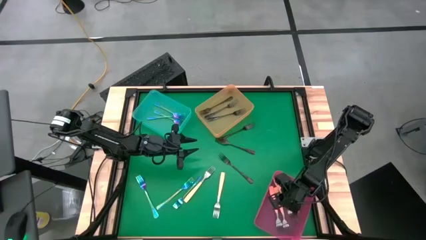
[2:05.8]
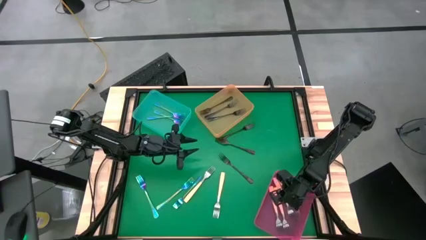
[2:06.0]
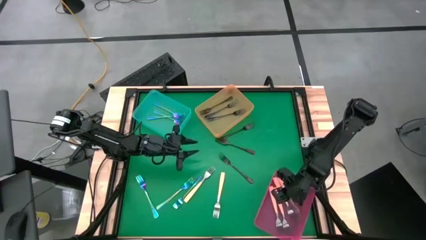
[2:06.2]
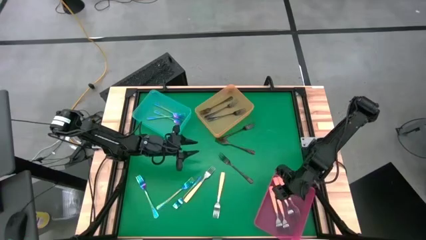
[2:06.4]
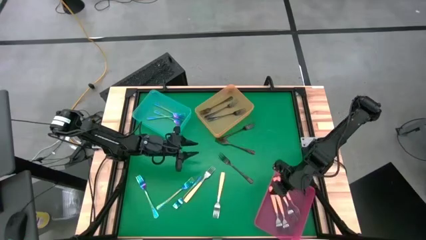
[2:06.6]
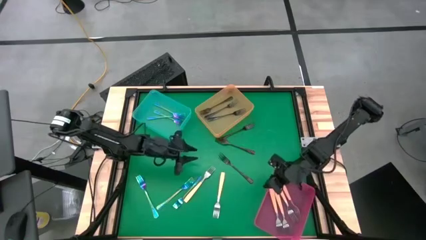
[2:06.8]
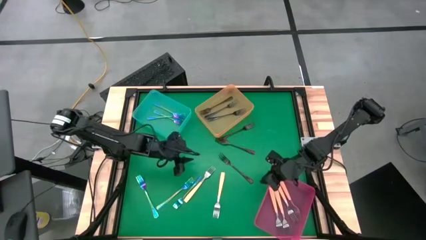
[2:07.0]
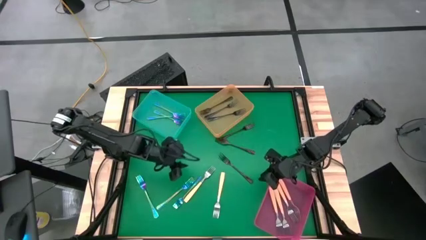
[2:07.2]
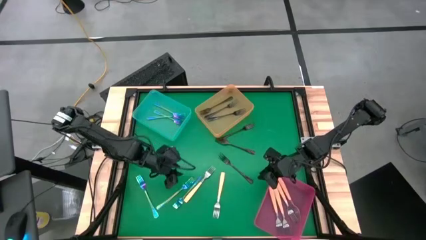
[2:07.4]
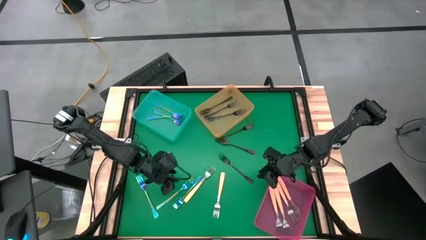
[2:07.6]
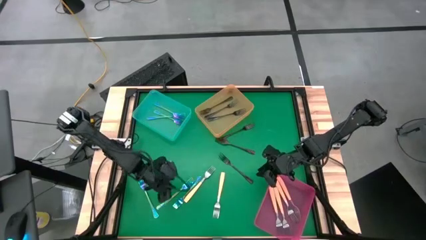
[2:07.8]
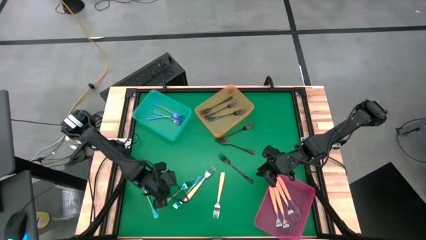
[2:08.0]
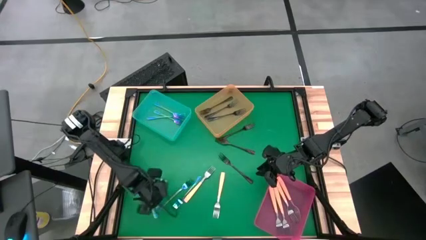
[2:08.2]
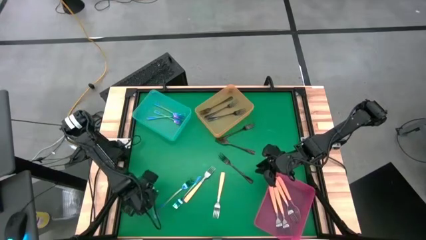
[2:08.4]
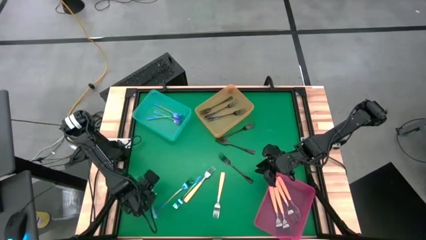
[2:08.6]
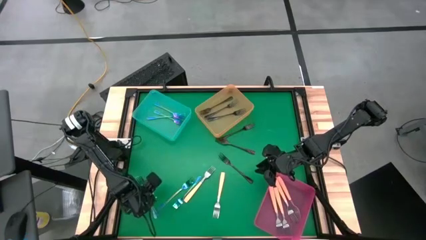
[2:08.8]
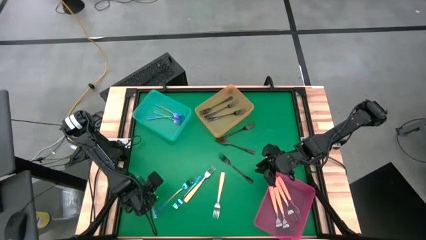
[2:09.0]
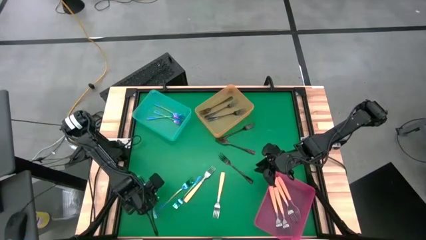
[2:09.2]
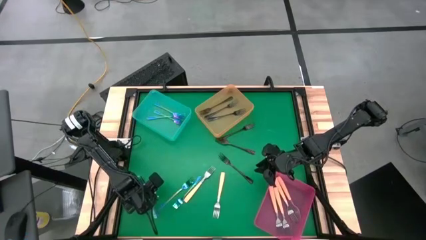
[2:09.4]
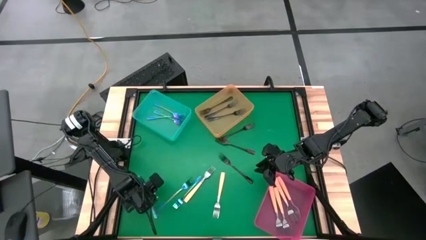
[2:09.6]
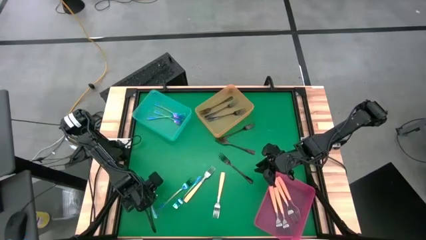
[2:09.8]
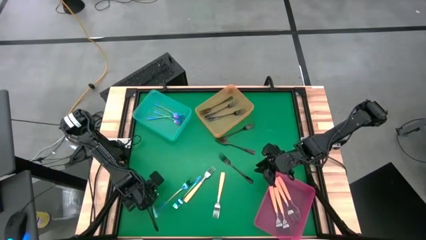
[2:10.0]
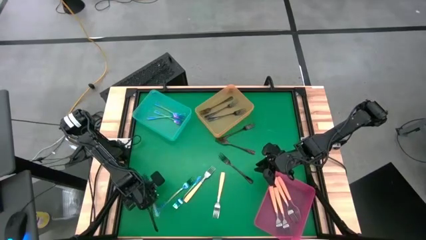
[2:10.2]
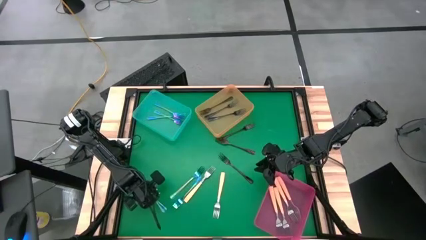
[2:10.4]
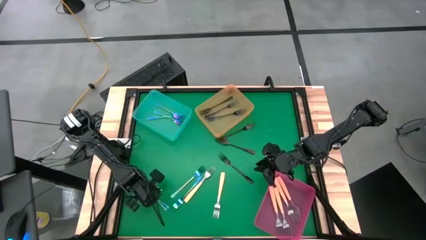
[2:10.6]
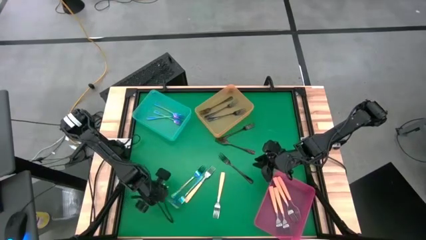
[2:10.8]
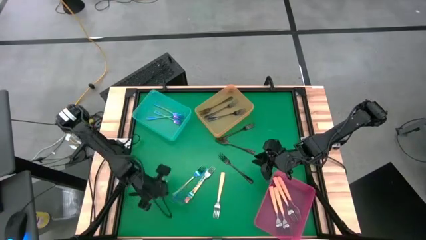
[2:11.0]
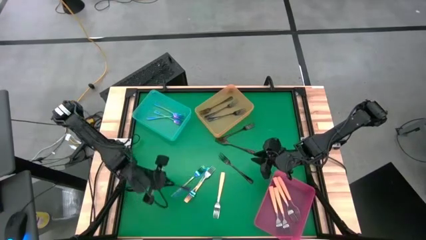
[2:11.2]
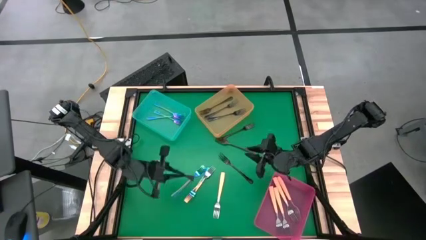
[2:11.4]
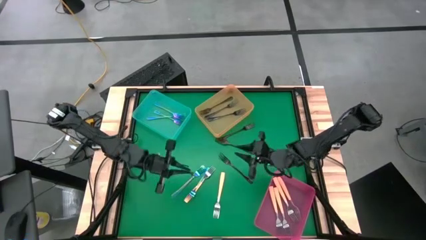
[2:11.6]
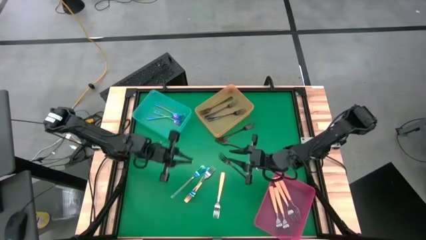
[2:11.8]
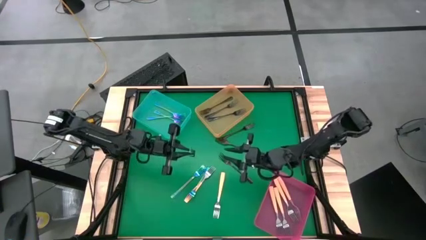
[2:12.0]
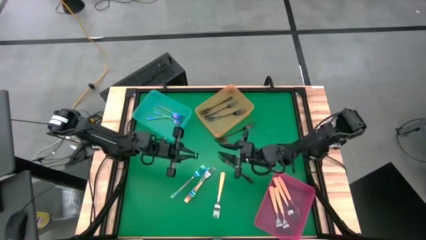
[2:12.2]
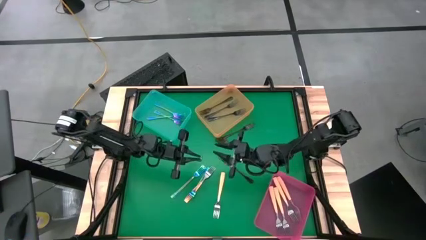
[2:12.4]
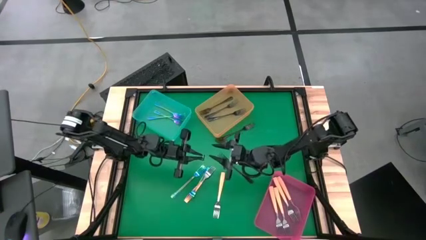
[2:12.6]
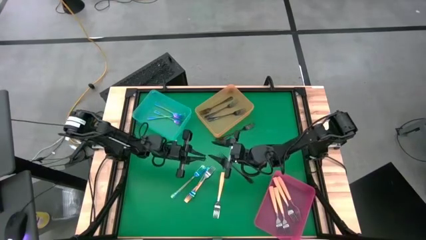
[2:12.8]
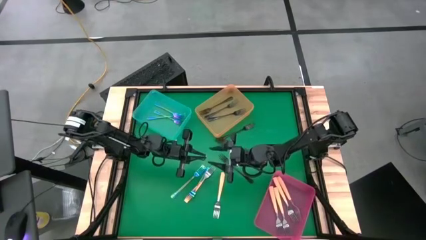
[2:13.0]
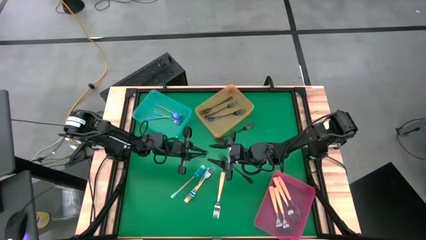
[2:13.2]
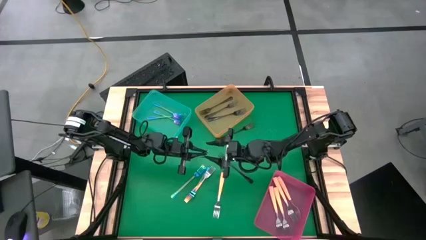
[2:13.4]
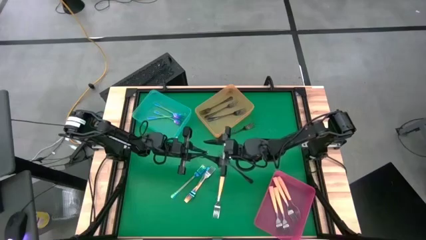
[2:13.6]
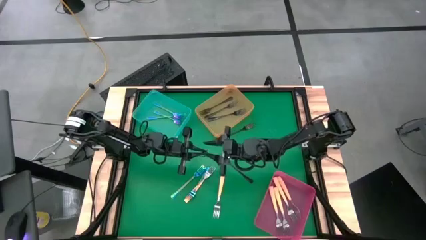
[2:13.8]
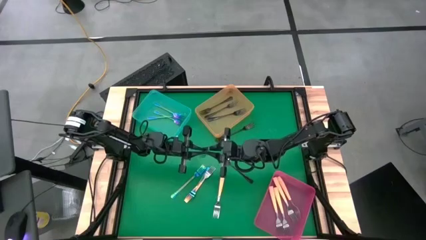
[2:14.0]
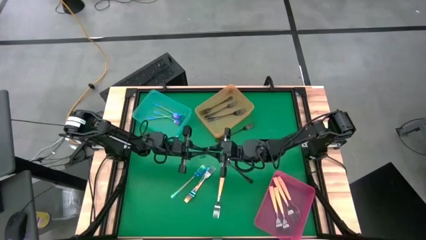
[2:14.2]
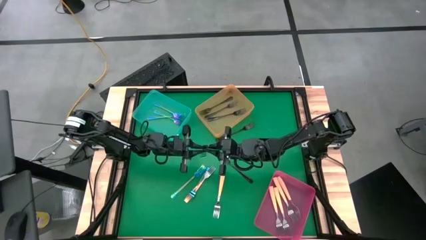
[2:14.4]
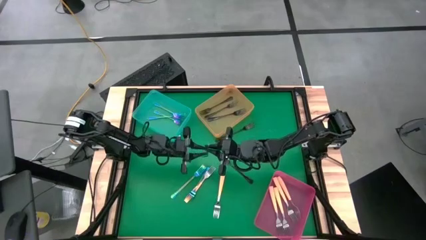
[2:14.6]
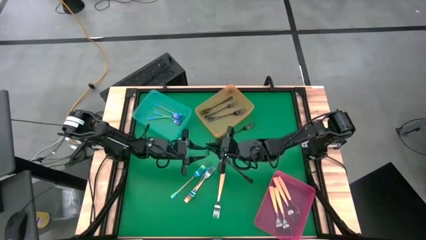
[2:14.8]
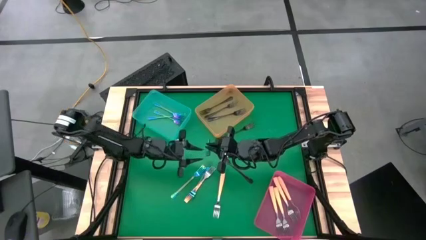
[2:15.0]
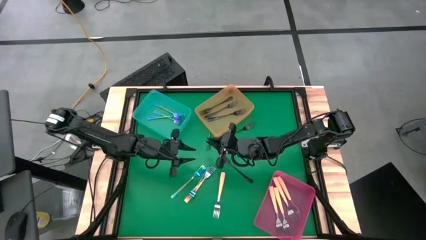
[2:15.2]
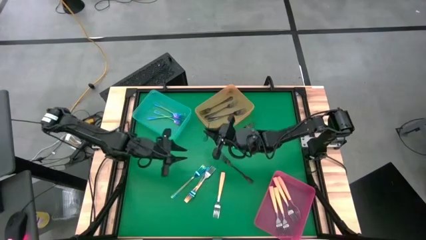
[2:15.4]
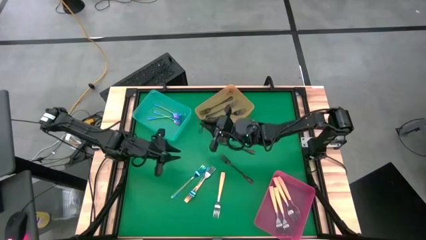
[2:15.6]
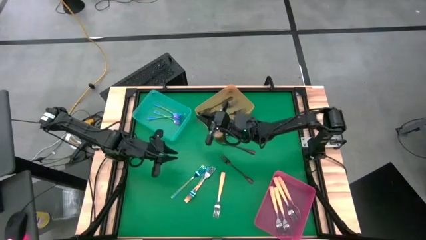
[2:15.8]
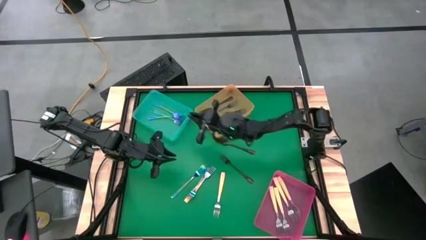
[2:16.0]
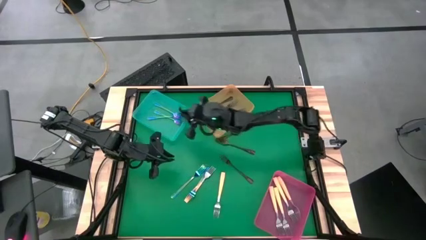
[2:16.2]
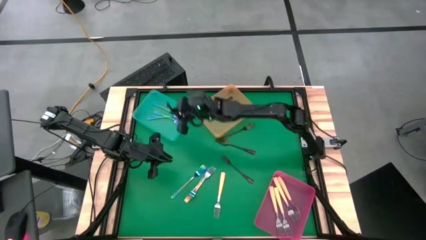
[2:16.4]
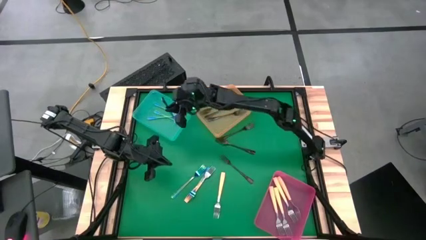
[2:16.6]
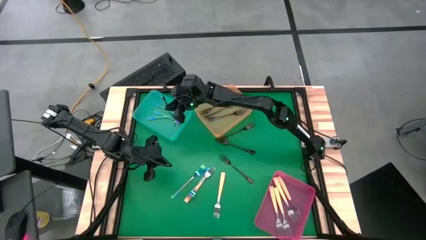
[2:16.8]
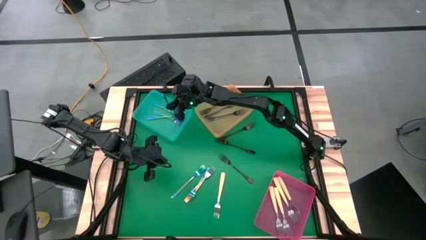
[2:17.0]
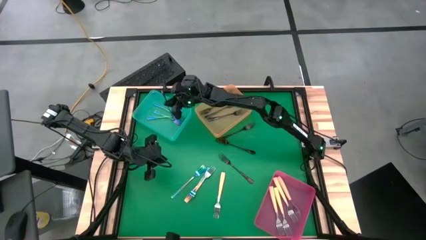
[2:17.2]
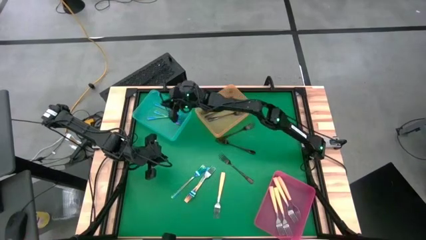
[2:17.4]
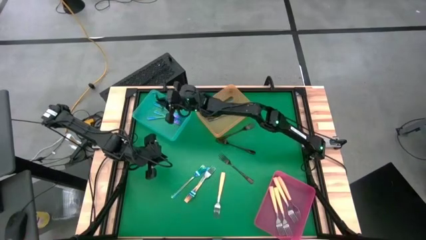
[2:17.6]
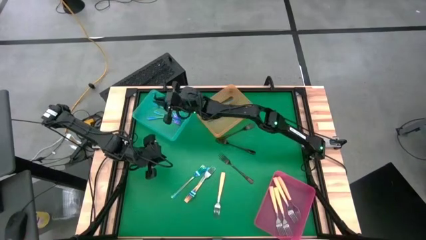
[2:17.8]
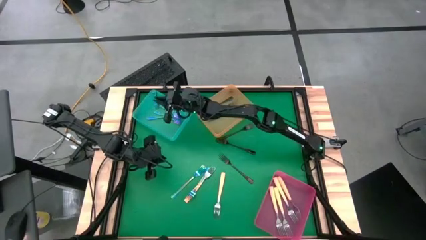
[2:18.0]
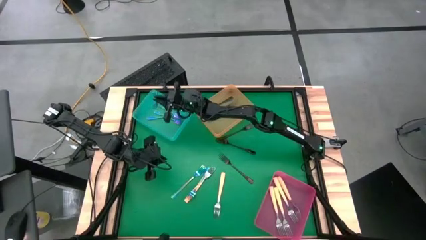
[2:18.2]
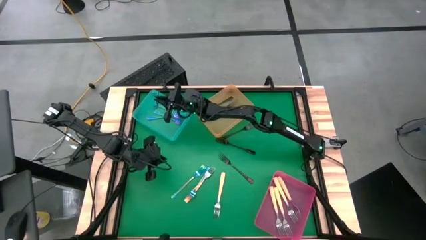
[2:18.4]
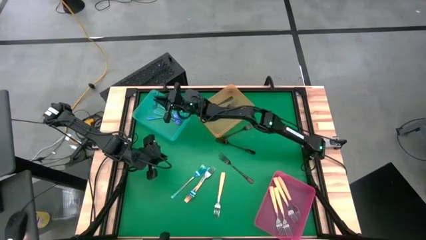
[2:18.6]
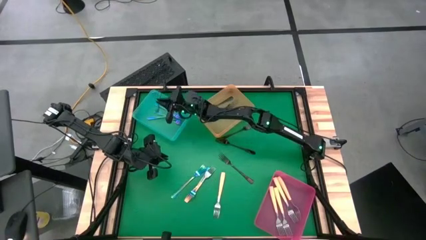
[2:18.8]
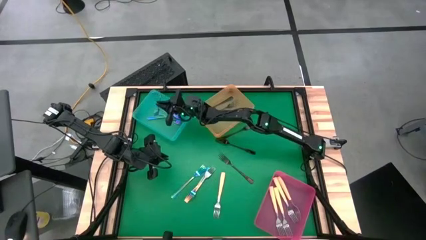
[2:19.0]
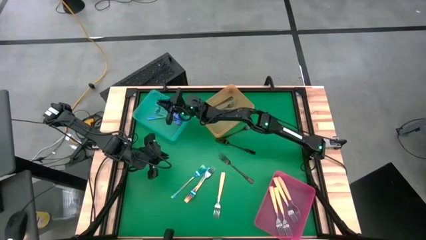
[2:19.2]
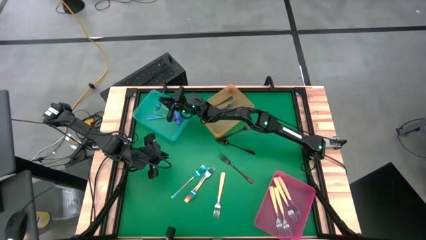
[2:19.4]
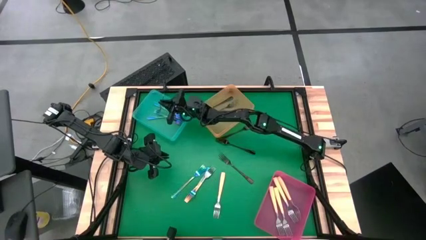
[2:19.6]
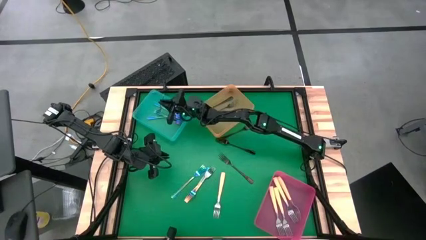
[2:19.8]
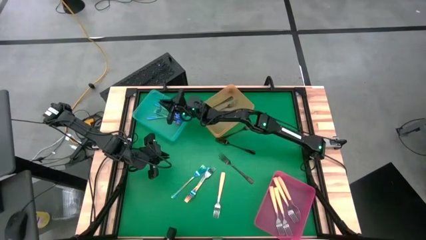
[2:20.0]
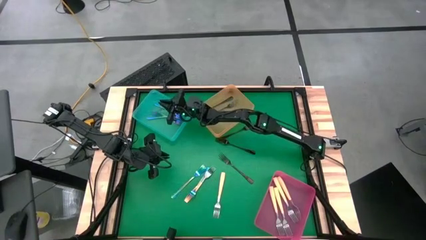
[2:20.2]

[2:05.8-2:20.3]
Task: Sort silverware by color (type)
Put the blue fork into the blue bin
